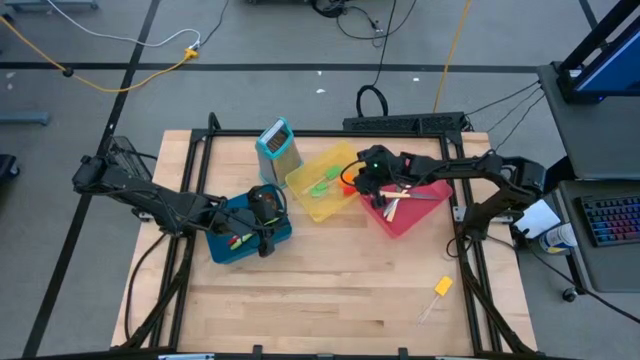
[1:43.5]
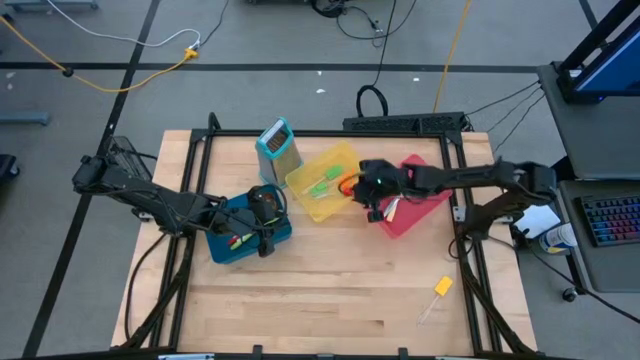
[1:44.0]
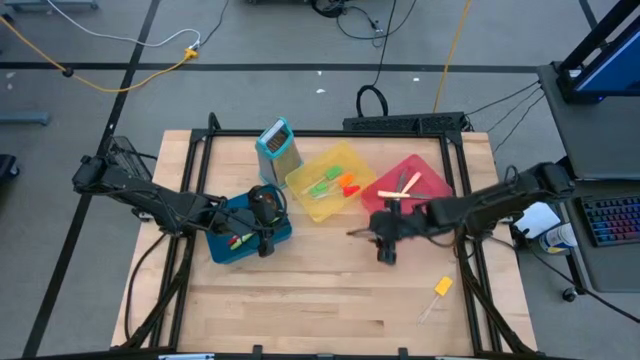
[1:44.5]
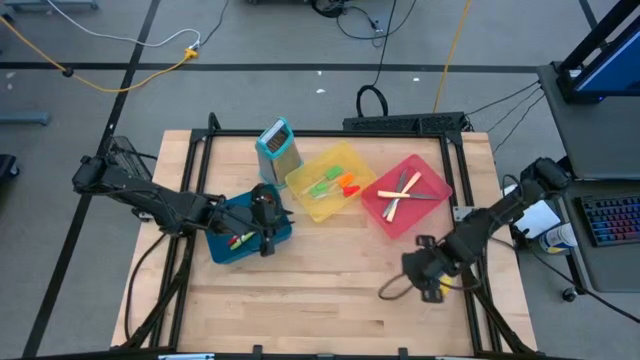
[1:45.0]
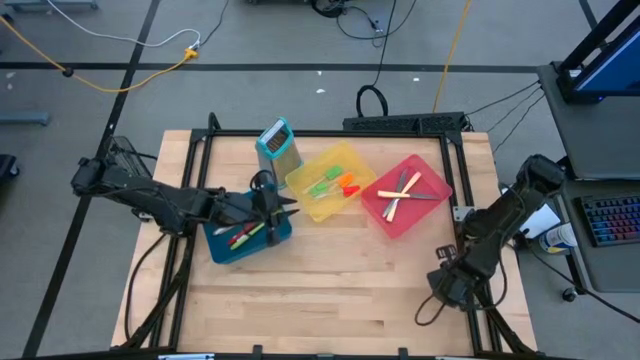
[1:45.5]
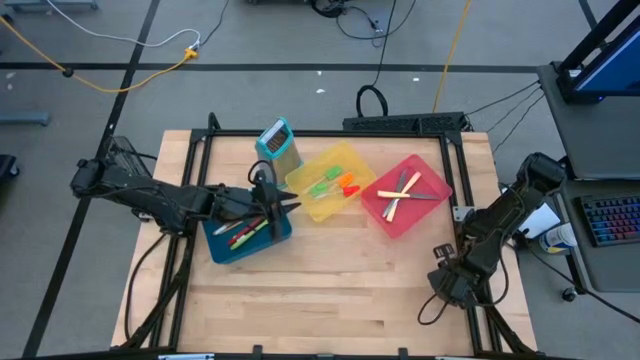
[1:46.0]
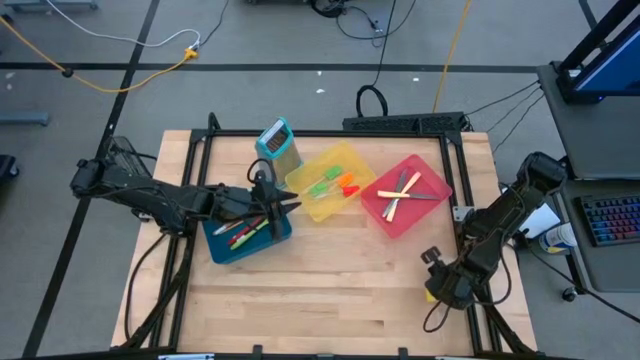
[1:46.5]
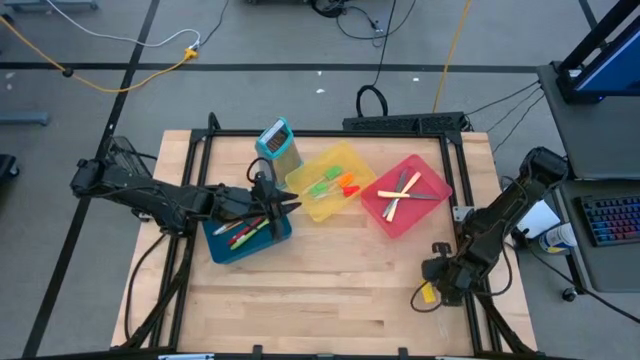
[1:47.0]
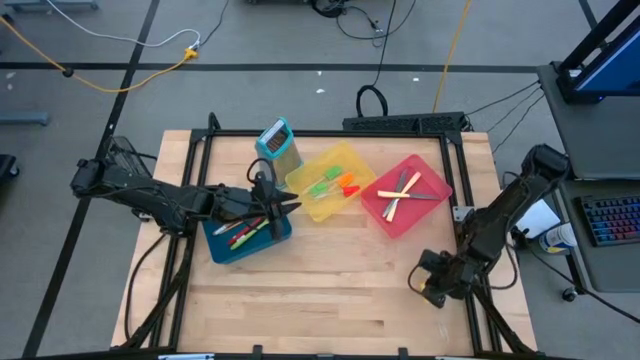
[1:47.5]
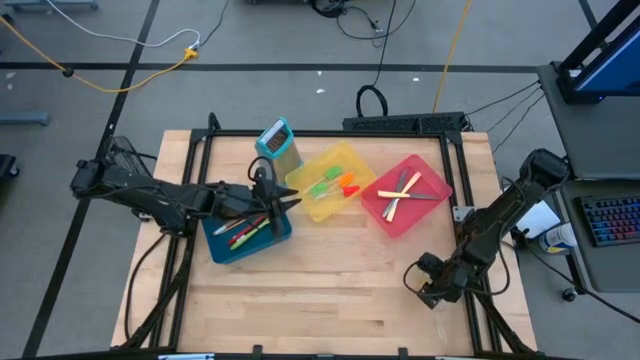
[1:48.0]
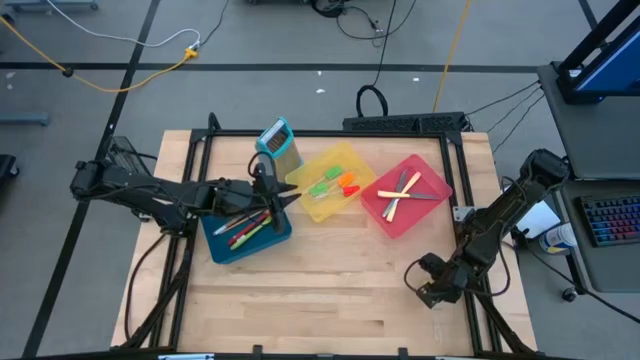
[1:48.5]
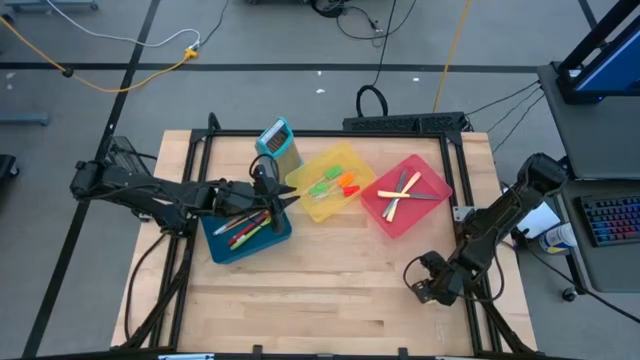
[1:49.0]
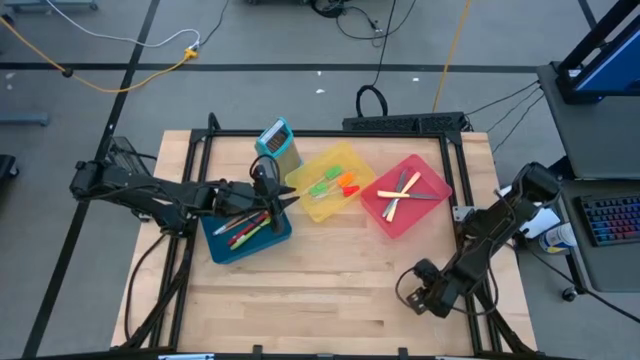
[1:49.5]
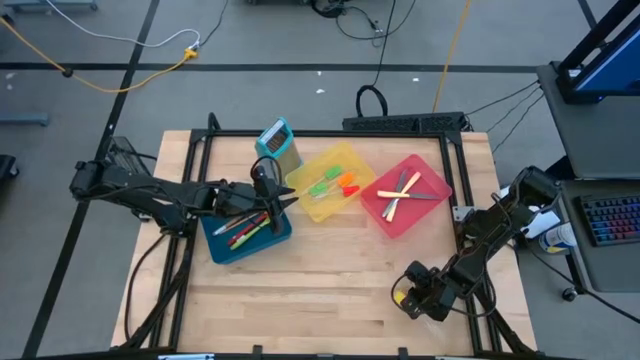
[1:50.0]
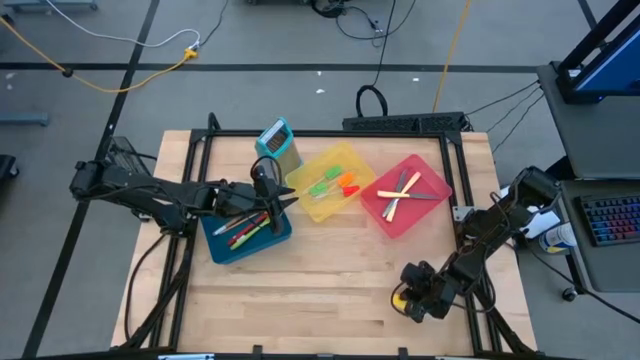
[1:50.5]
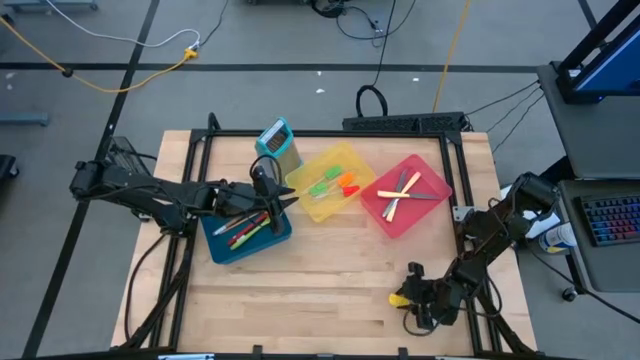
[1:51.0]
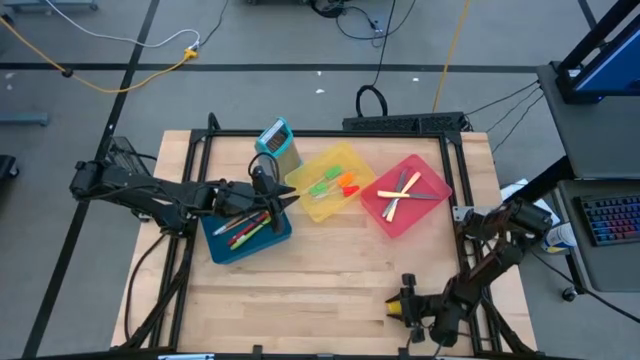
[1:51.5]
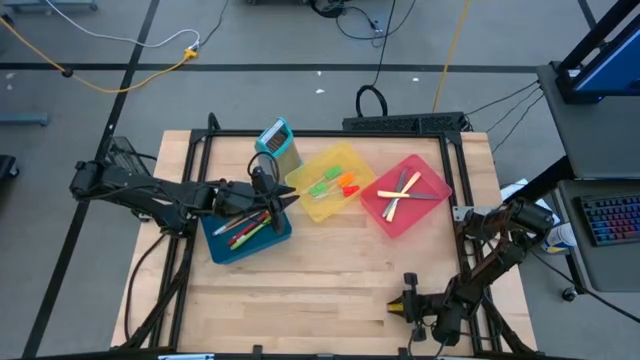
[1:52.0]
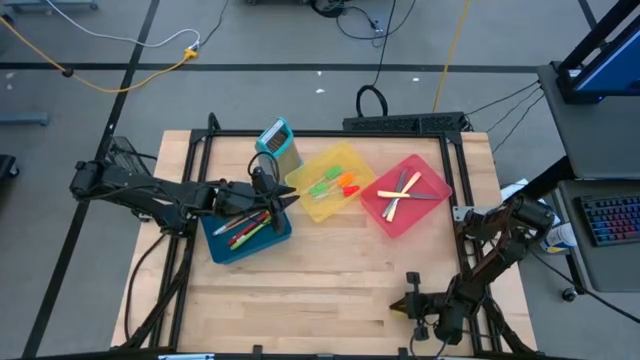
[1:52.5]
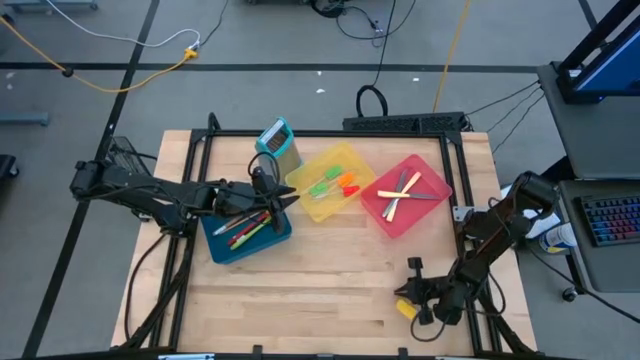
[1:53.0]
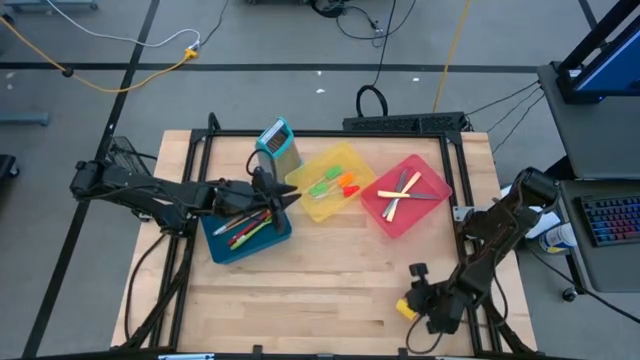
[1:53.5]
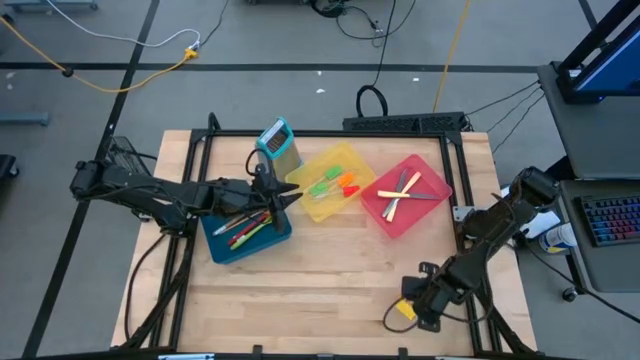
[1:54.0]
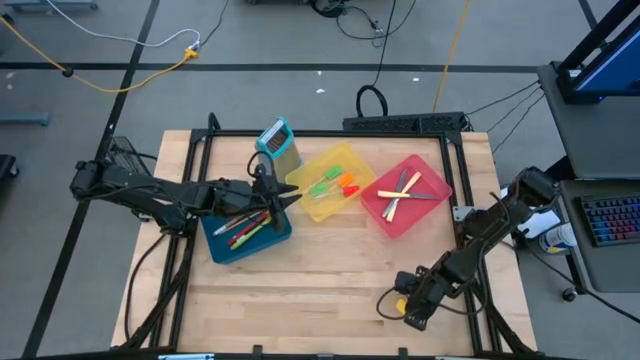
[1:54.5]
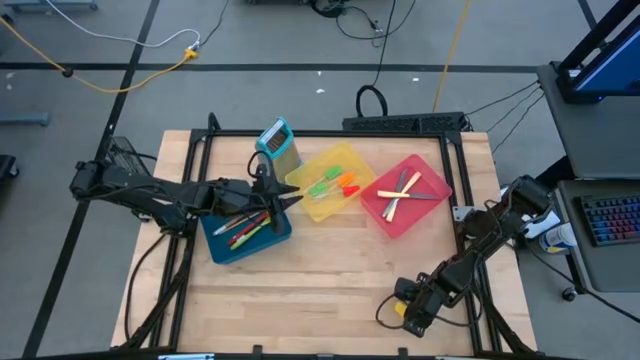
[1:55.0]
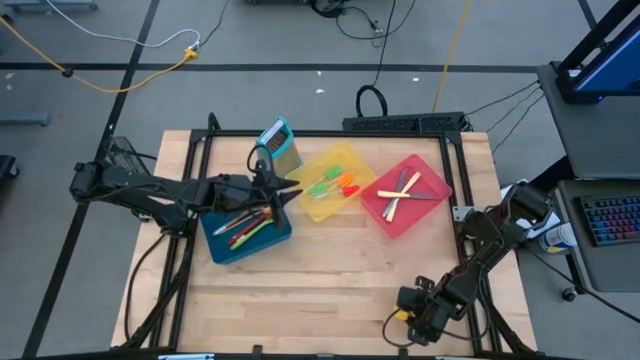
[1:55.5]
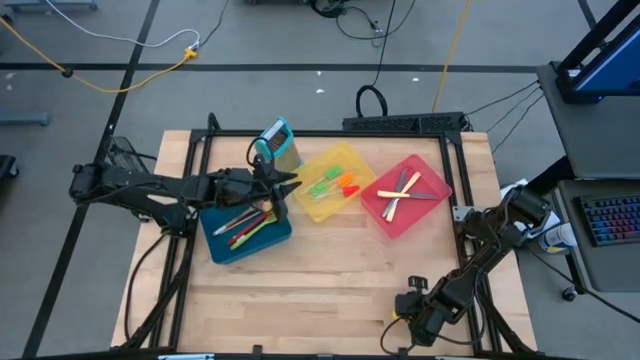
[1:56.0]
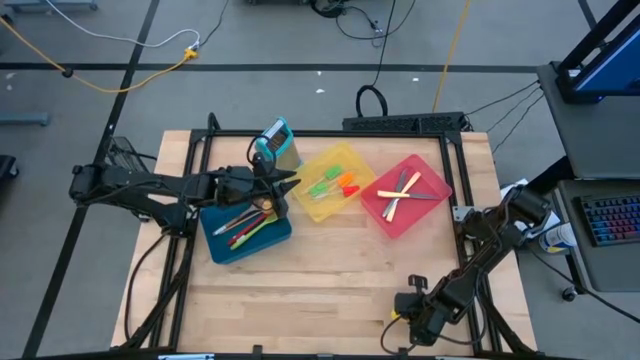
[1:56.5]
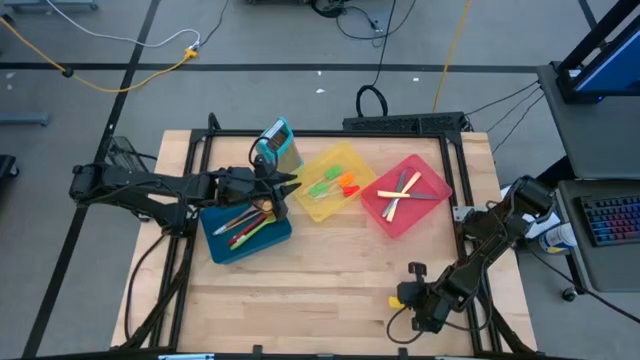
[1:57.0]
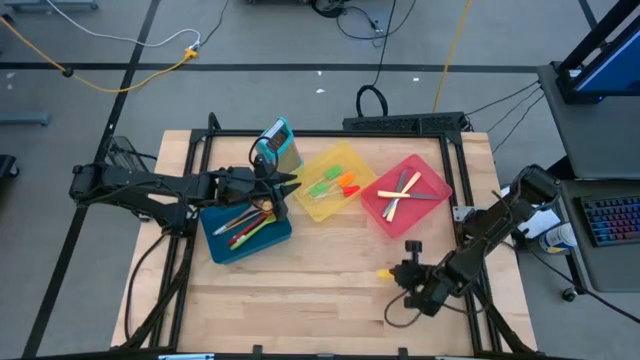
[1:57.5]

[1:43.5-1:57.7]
Task: Pick & Place Kitchen Items
Put the yellow spatula into the yellow bin

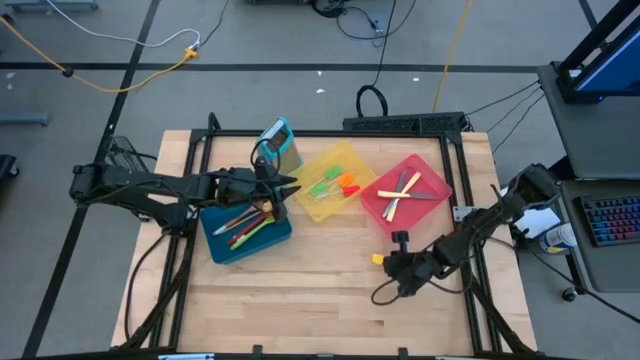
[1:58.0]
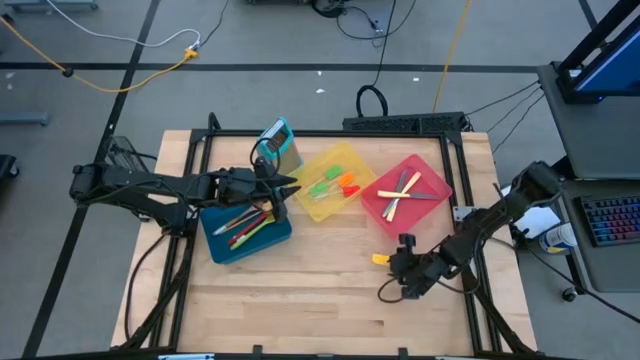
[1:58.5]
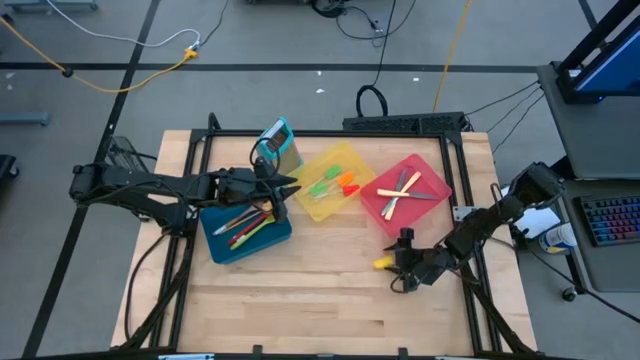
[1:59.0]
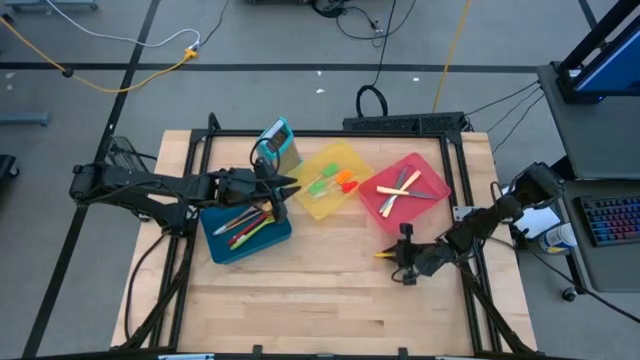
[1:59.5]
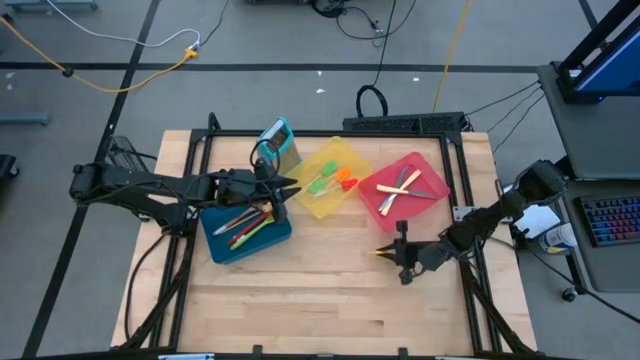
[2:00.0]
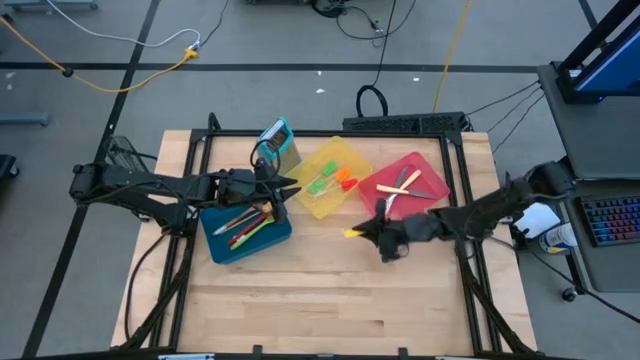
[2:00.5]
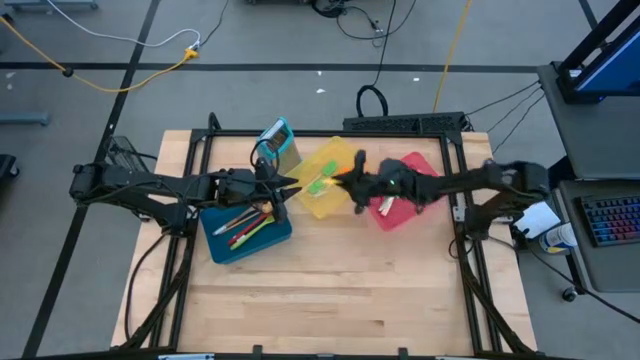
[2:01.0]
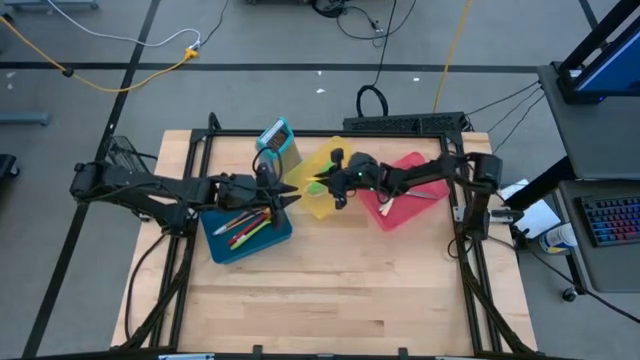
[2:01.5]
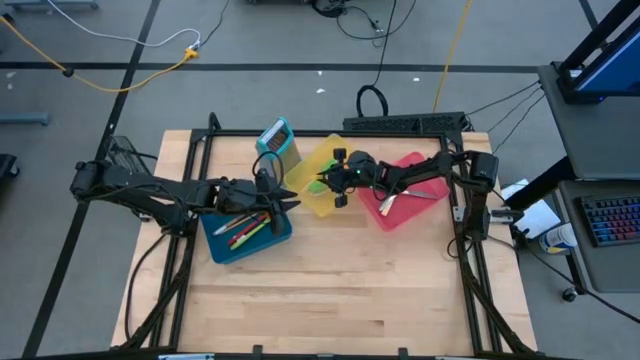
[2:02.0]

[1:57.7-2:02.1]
Put the yellow spatula into the yellow bin

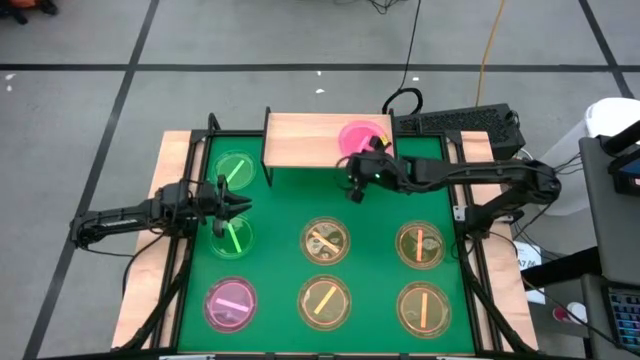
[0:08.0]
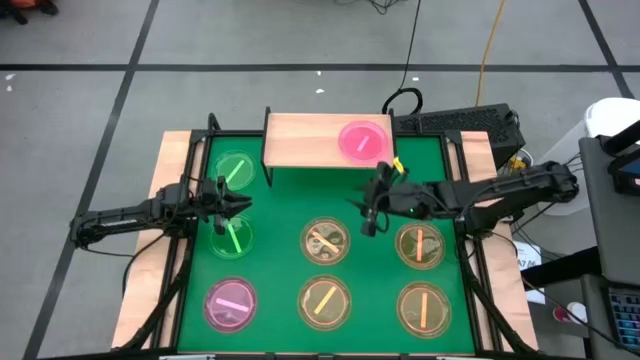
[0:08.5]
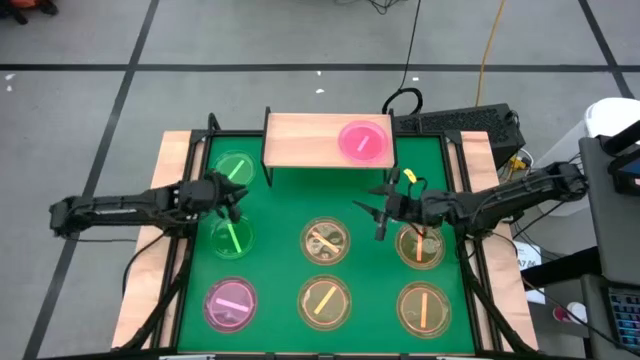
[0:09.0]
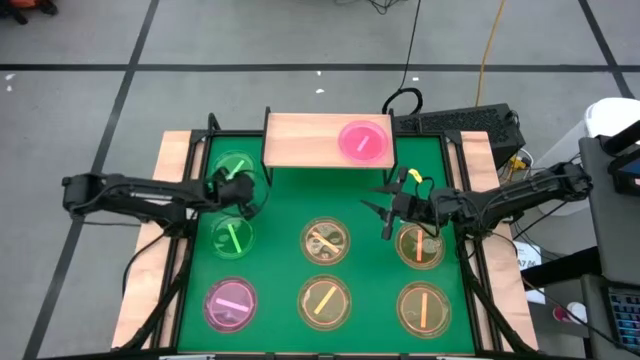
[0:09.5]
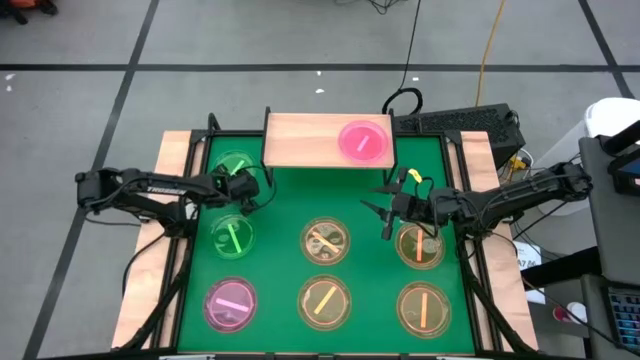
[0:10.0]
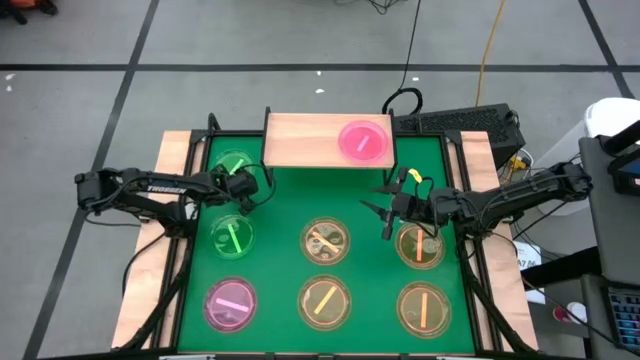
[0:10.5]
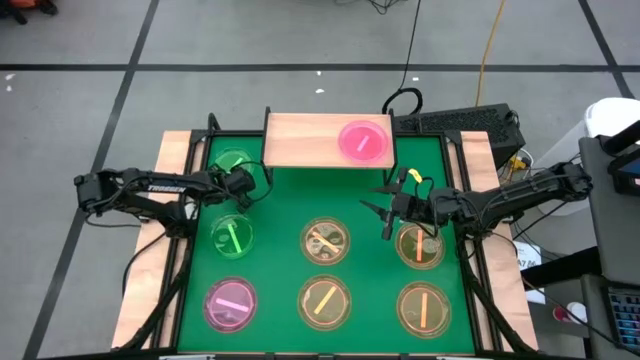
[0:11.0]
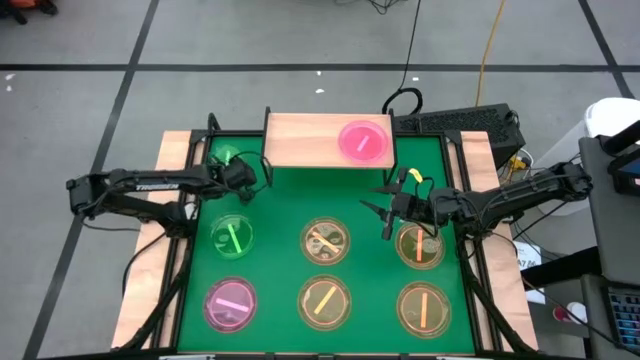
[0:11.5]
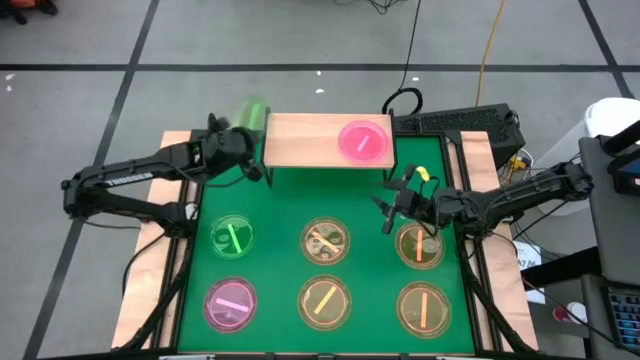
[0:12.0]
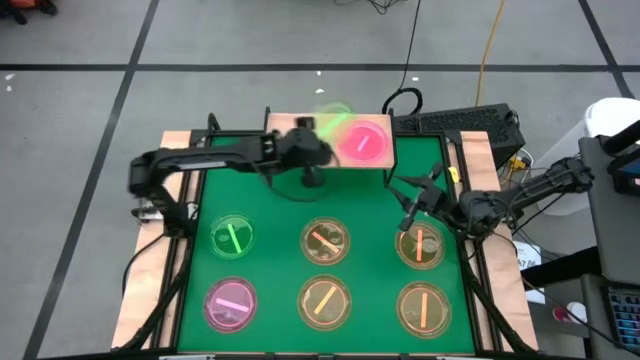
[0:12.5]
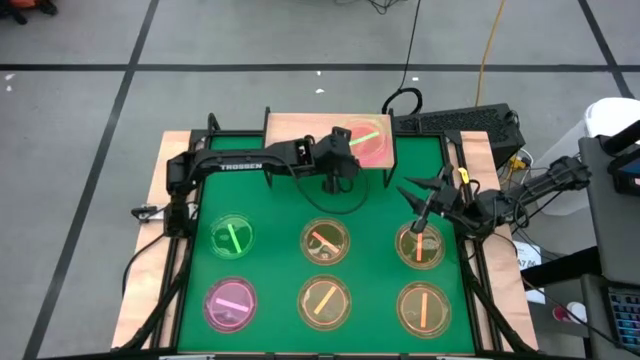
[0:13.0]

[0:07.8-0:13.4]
Task: Place and stack plates onto a shelf
Stack the top green plate on top of the pink plate on the shelf
